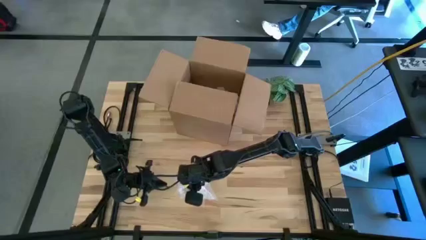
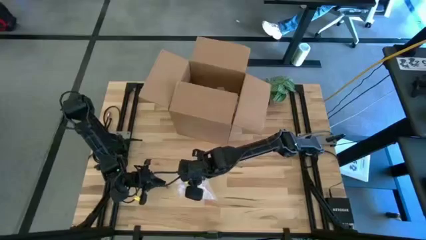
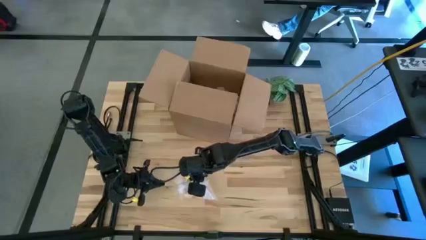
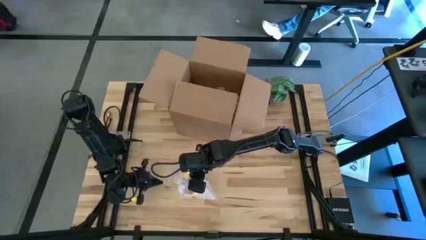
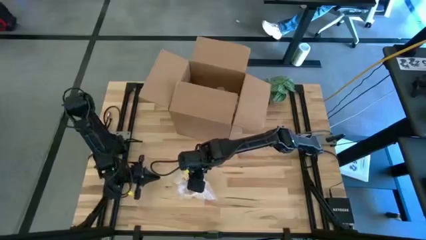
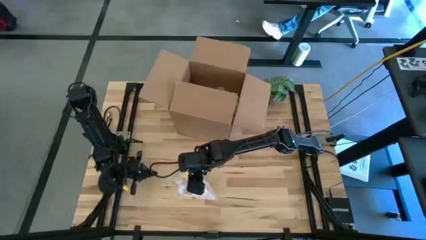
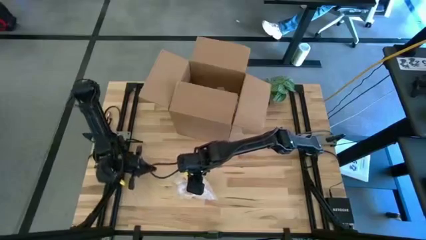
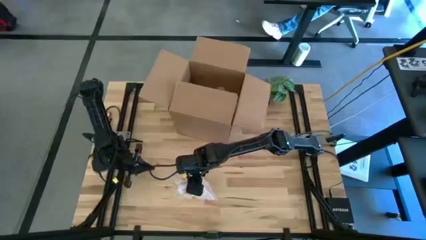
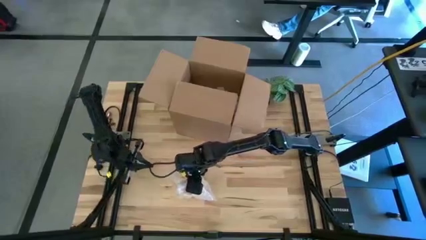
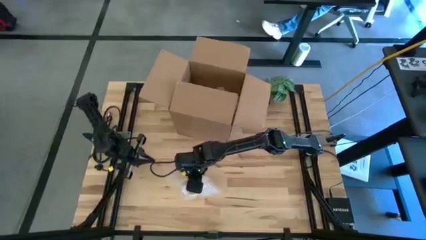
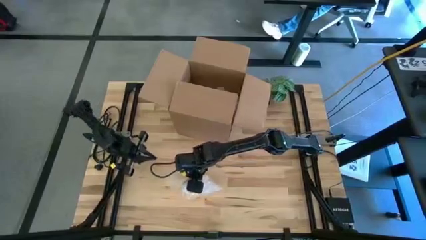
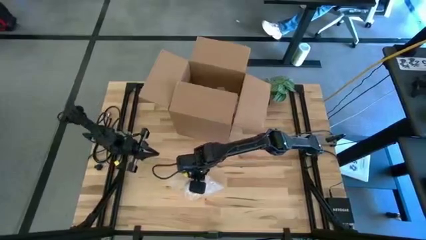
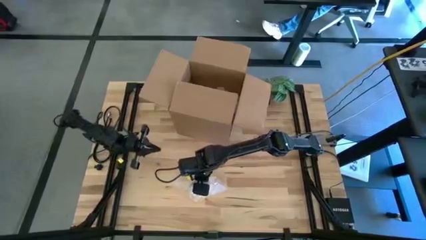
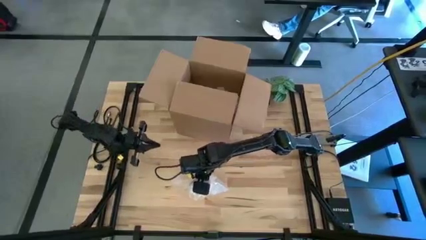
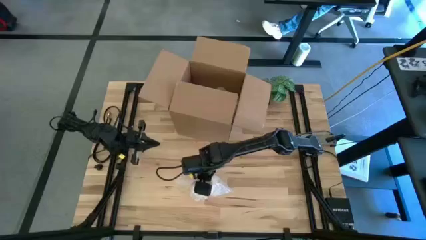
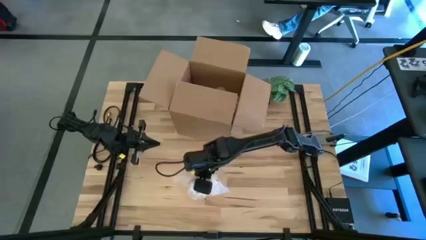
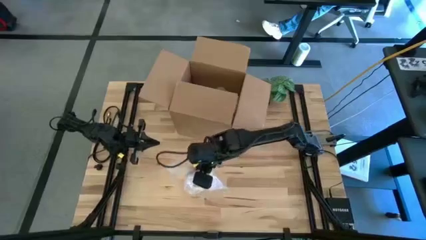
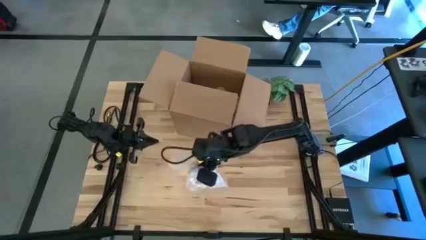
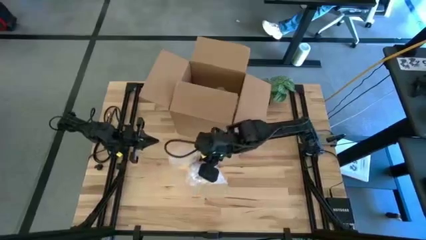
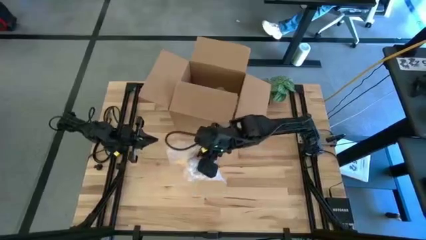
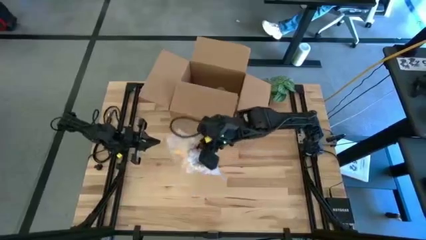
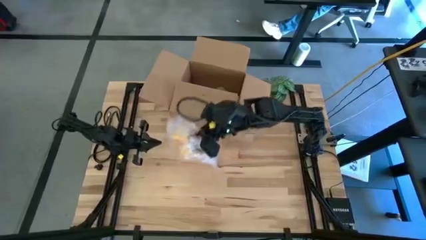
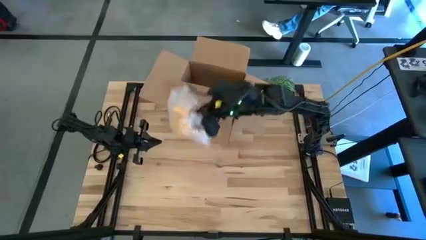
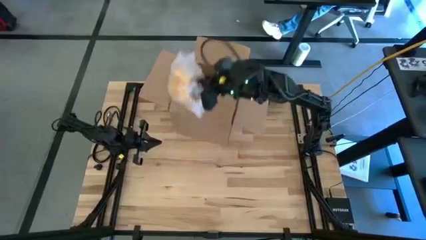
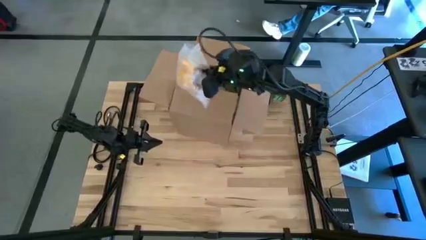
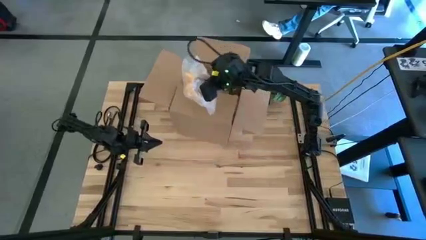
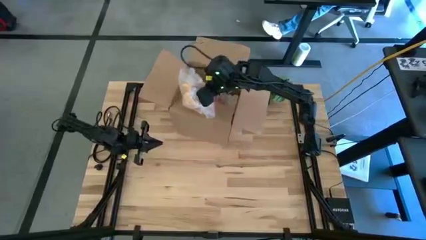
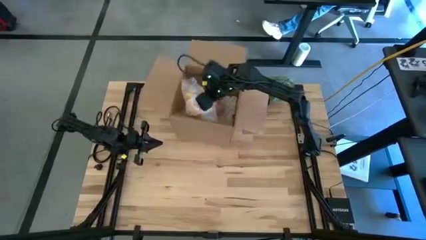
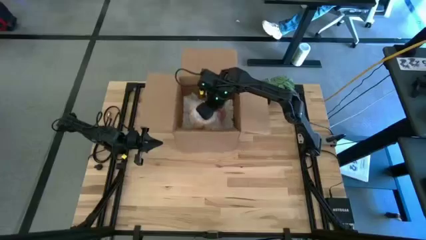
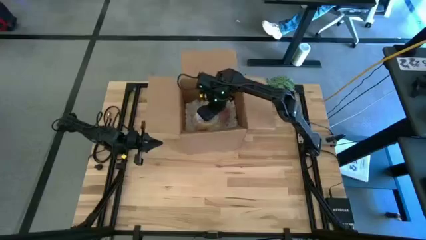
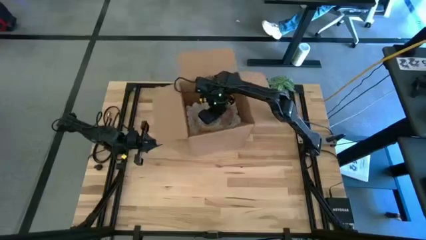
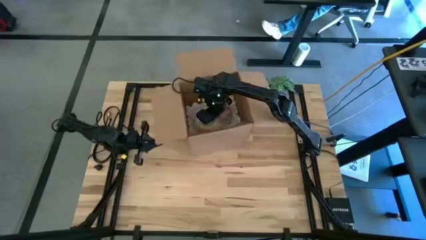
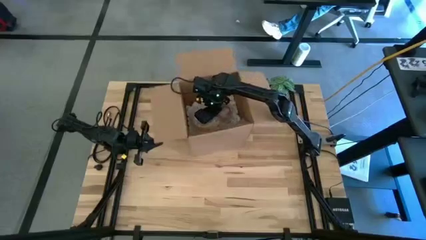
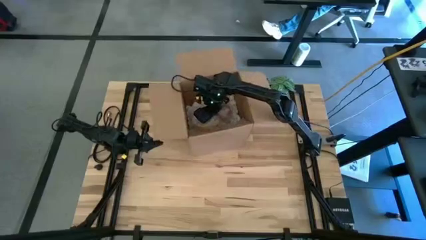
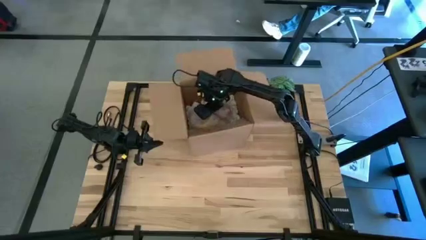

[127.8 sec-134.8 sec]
Task: wrap mug
Put the wrapped yellow mug into the box

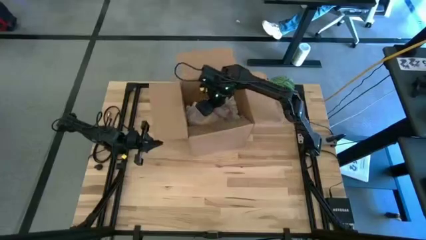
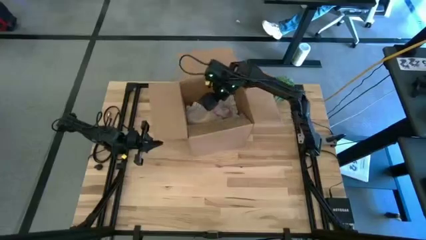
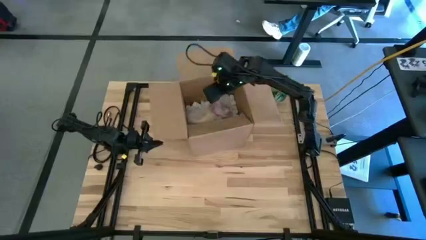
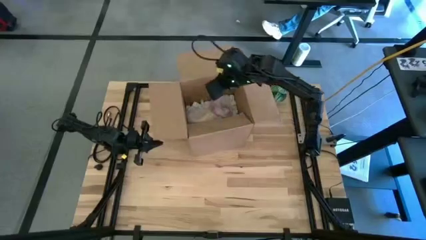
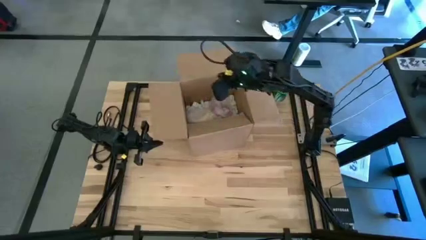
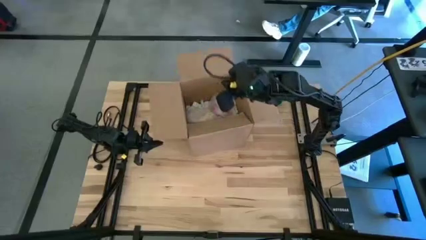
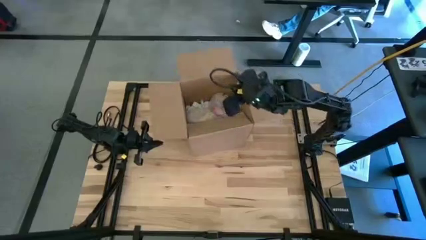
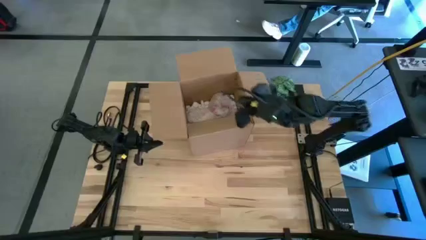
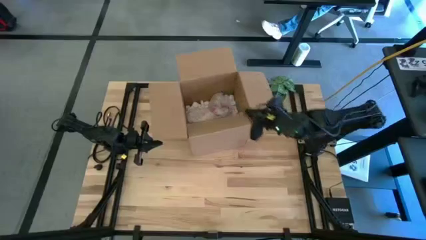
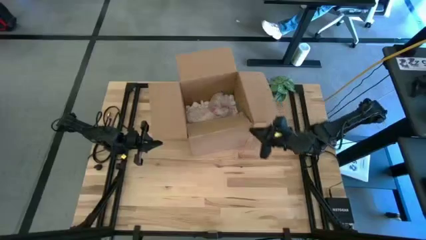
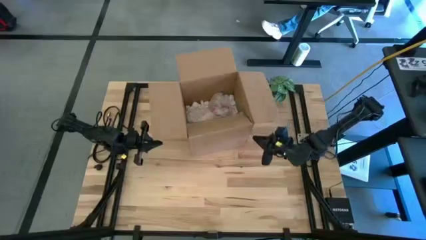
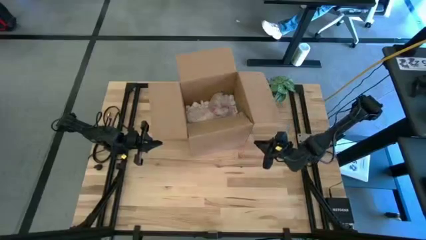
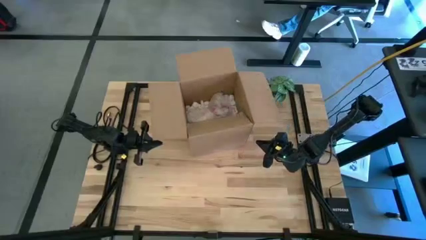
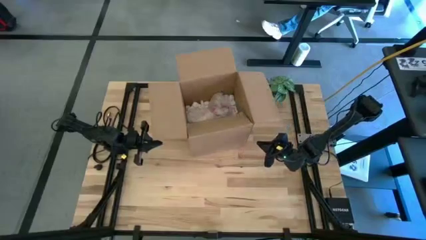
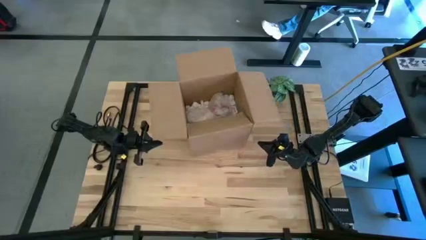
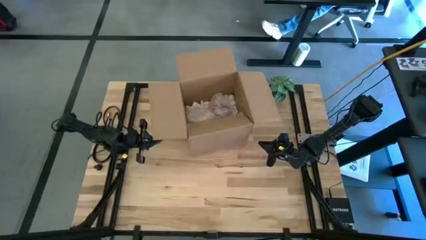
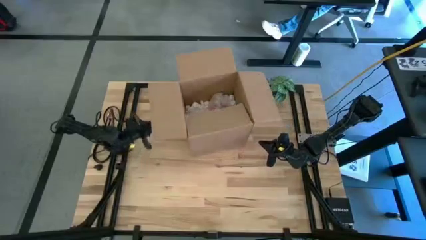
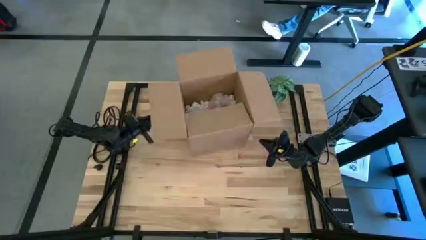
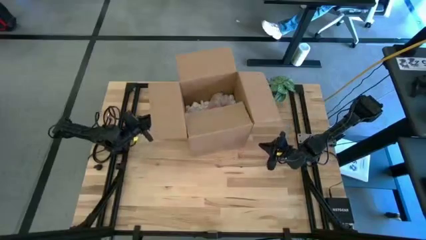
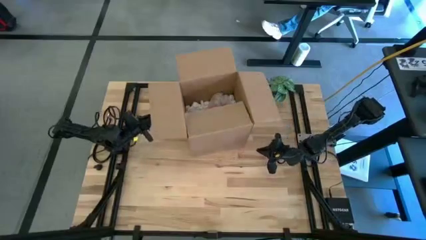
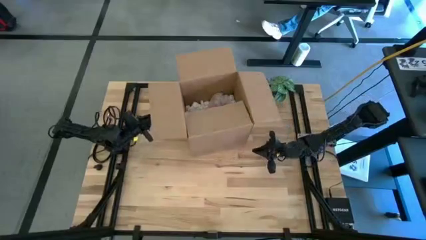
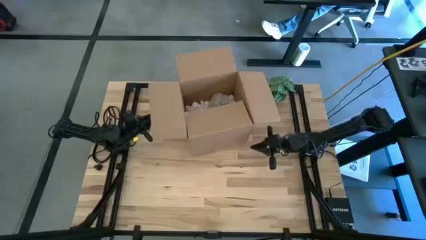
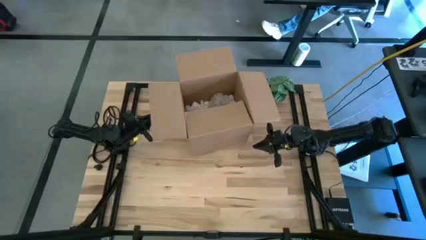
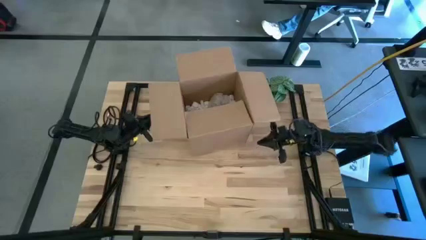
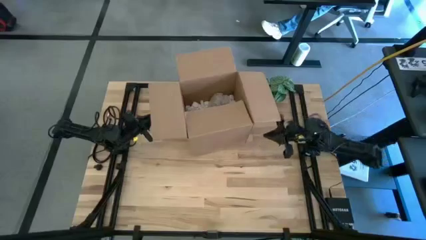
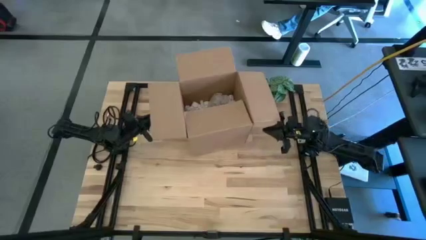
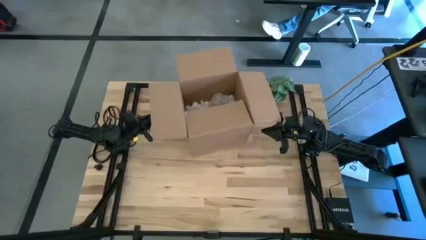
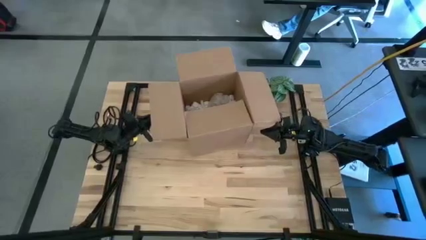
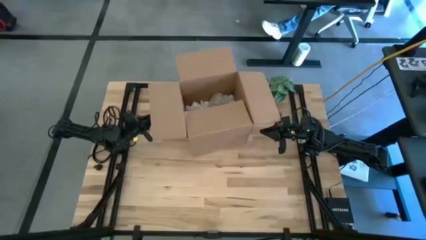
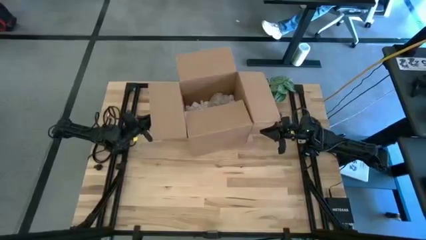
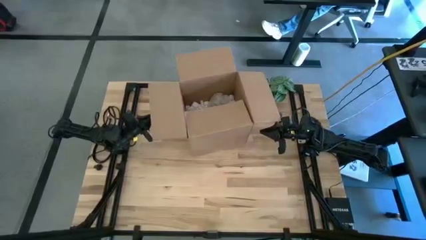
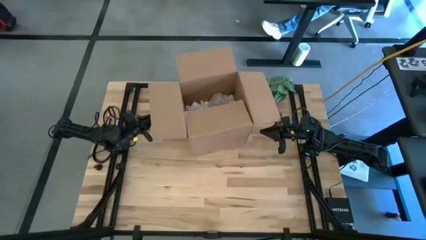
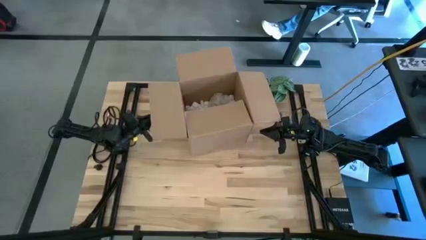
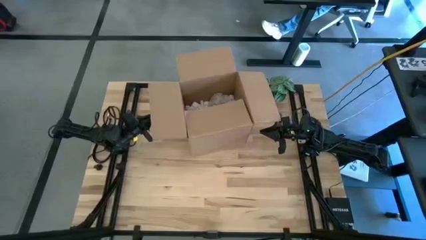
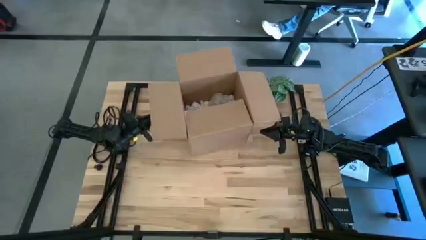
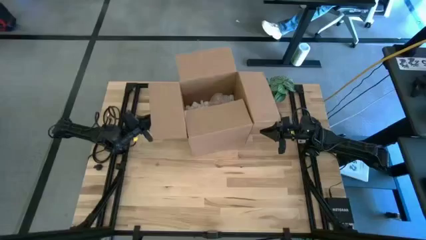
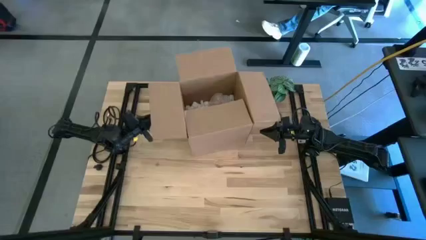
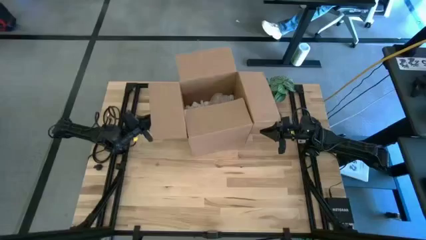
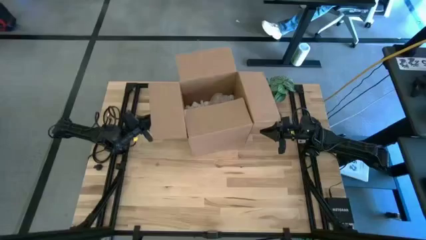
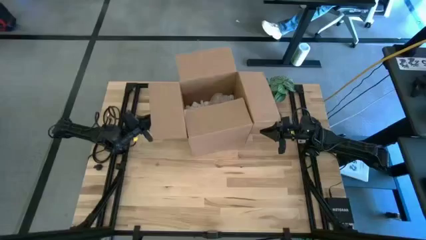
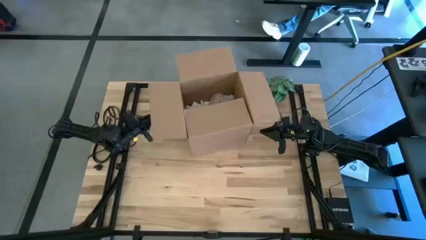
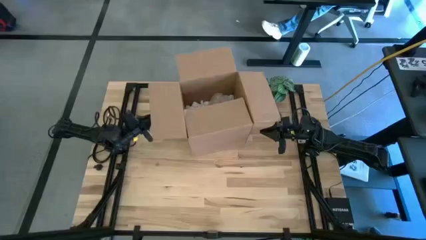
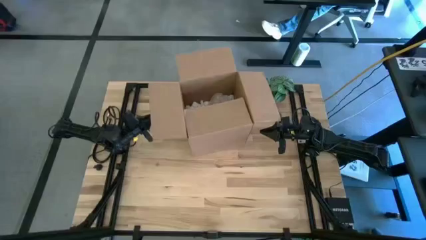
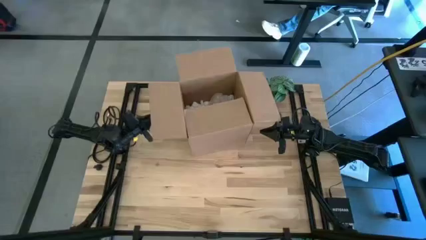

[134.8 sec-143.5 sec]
Return to Home Position
